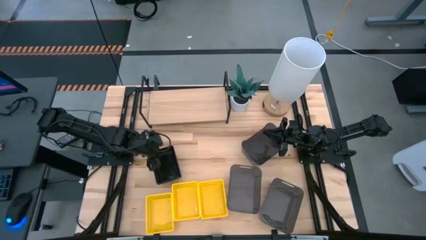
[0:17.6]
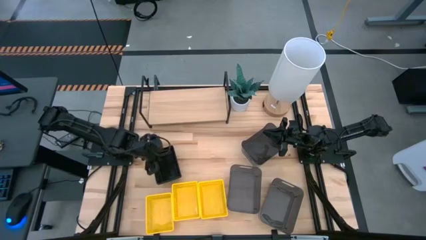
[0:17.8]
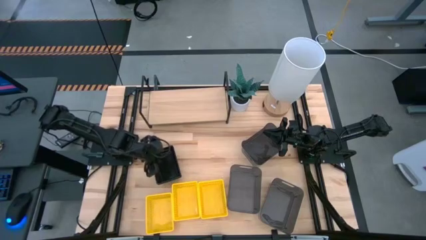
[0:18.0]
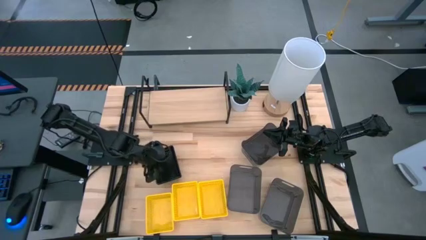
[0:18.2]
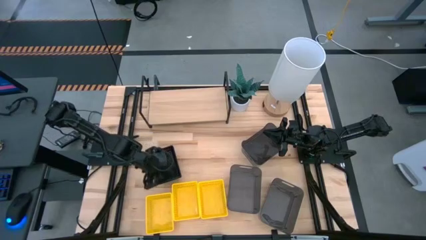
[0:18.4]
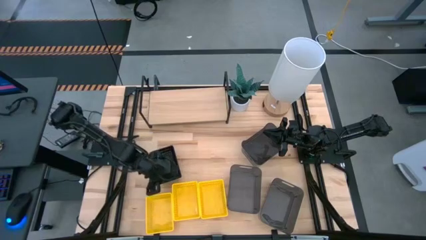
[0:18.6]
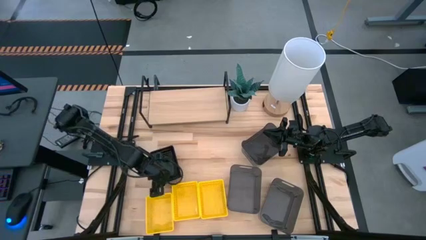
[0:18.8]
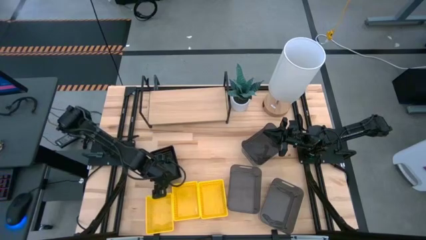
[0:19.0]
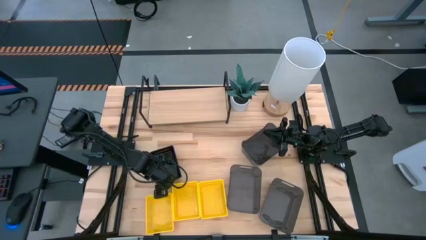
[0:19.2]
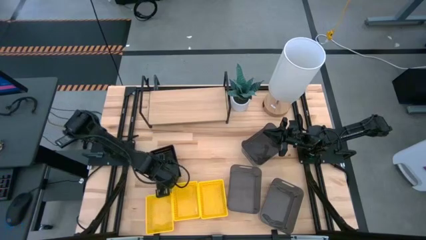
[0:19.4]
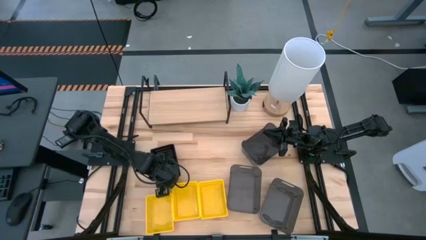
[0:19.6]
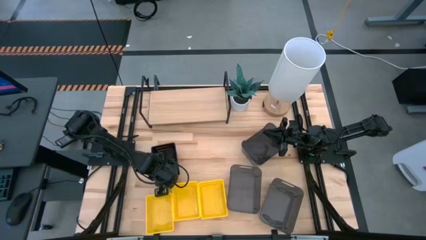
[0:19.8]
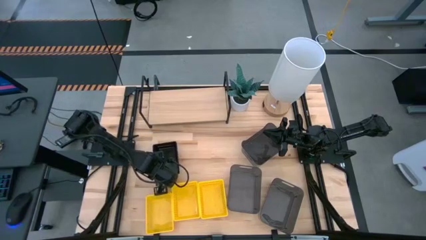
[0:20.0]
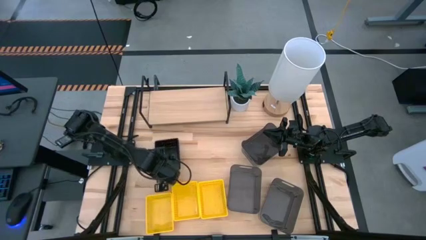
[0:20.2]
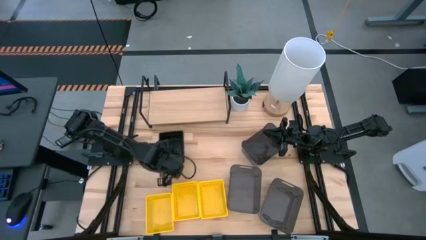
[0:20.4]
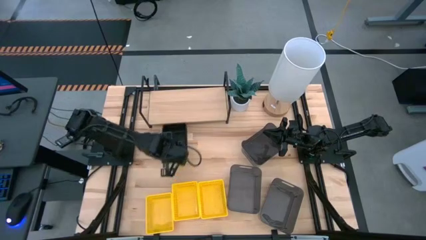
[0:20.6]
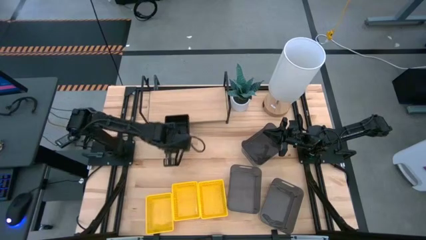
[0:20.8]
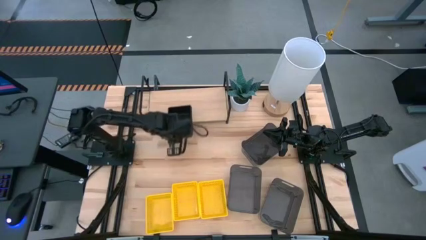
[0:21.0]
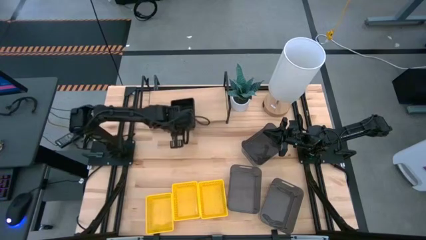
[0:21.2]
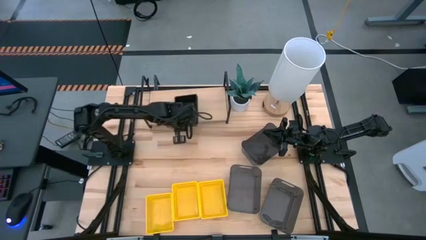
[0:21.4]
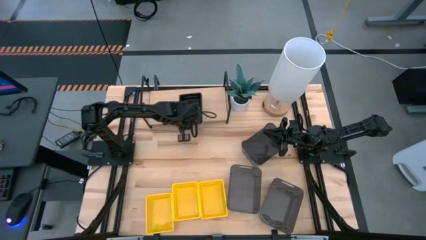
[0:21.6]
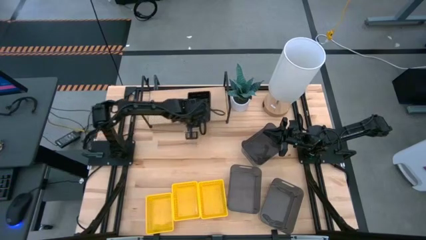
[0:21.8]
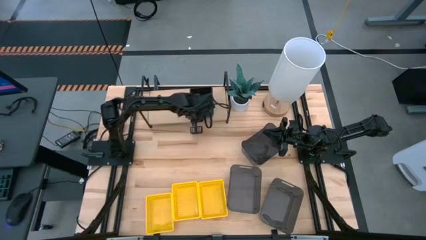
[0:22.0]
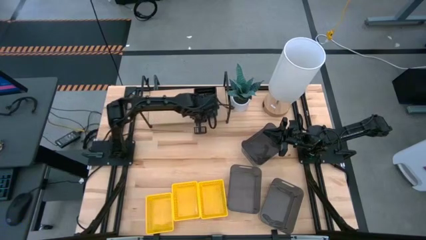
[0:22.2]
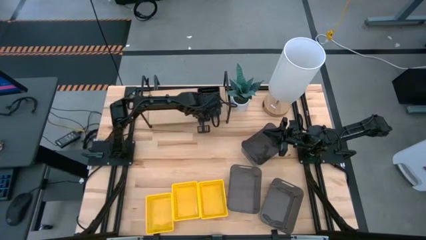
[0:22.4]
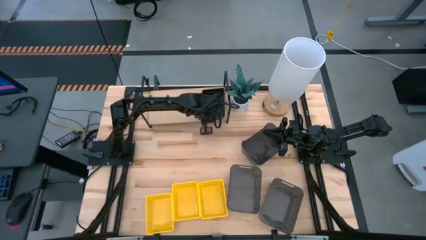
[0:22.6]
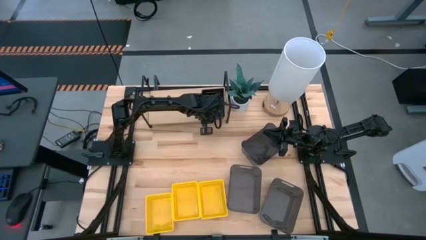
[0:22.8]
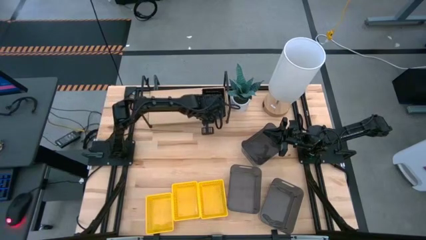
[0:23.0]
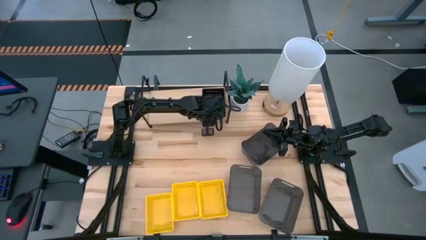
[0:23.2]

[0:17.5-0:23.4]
Task: Stack baskets on shelf by color
Put the stacked black bins on the shelf

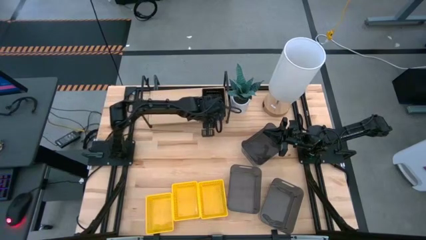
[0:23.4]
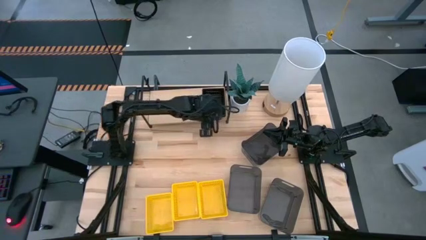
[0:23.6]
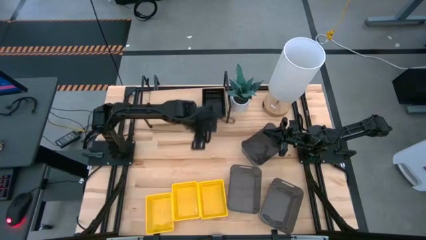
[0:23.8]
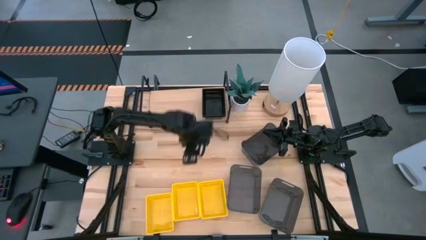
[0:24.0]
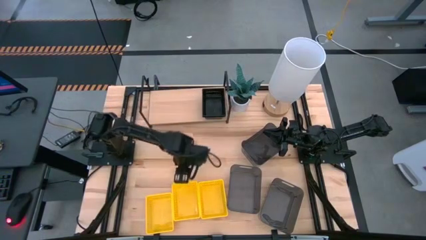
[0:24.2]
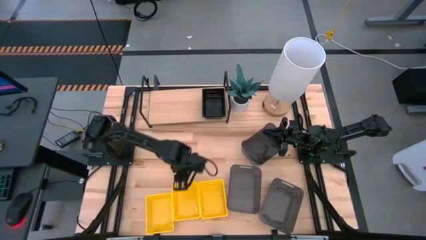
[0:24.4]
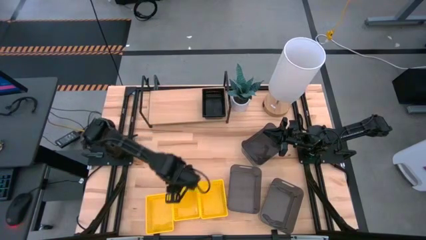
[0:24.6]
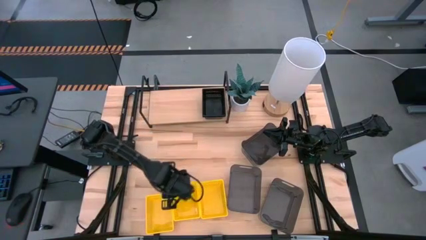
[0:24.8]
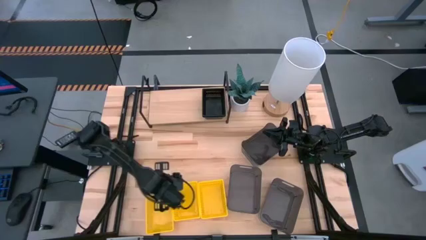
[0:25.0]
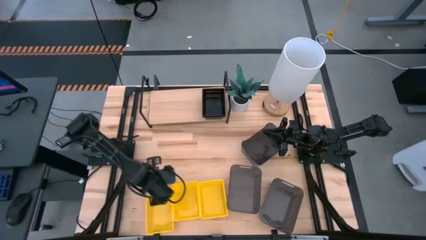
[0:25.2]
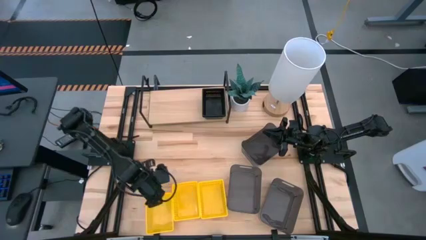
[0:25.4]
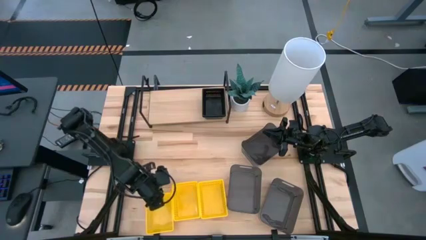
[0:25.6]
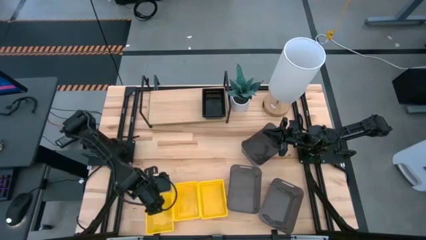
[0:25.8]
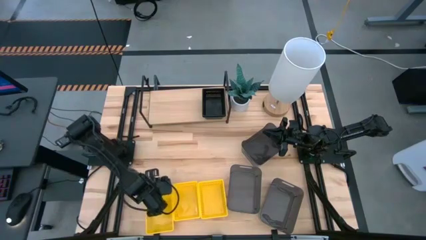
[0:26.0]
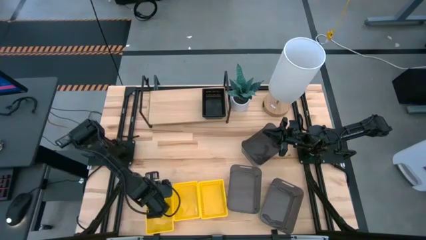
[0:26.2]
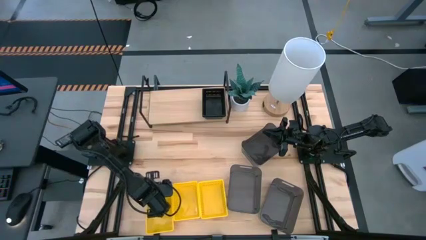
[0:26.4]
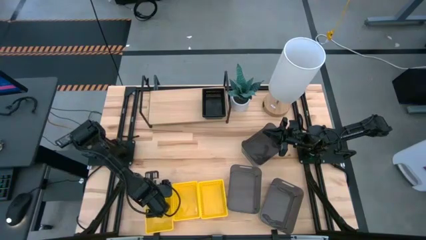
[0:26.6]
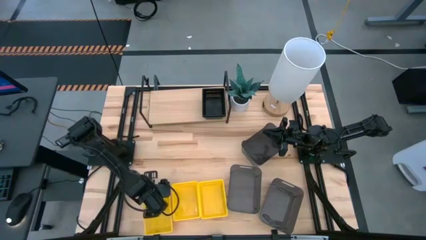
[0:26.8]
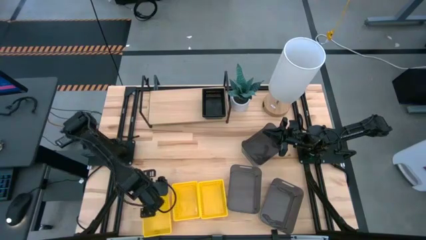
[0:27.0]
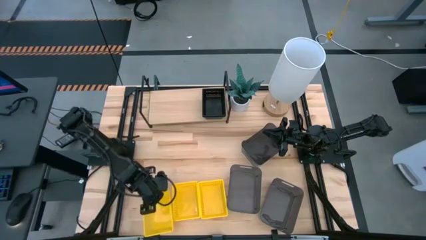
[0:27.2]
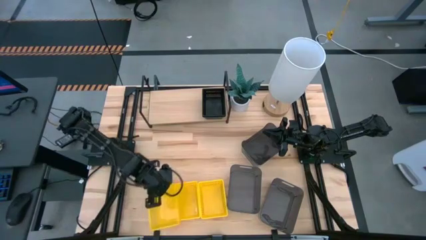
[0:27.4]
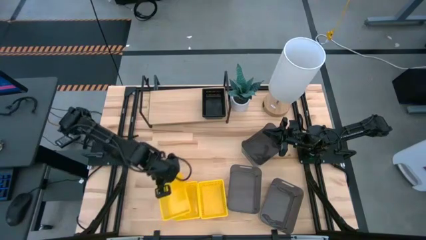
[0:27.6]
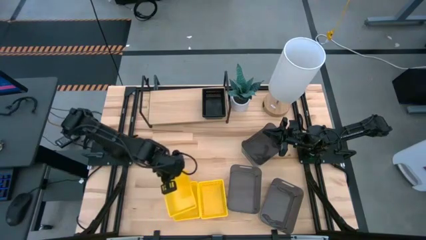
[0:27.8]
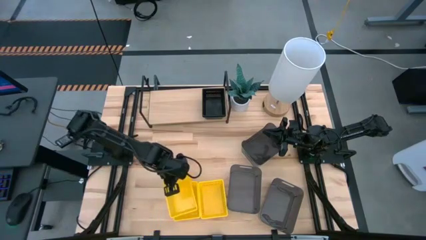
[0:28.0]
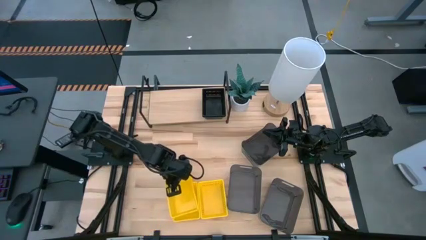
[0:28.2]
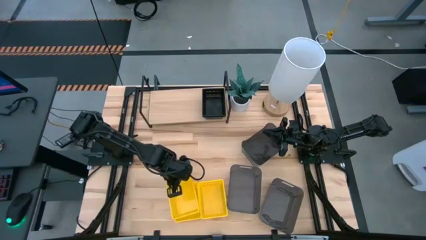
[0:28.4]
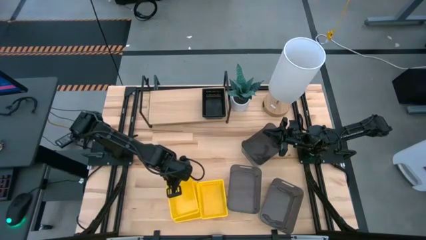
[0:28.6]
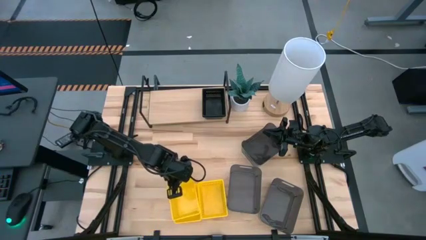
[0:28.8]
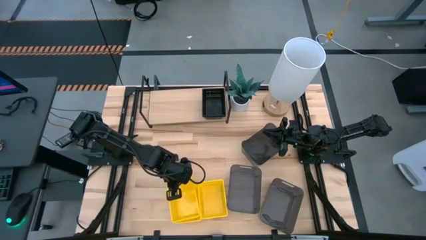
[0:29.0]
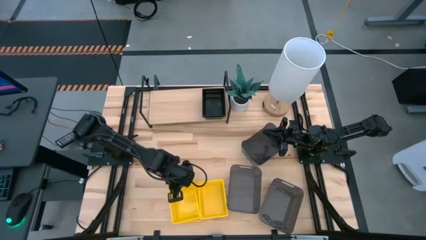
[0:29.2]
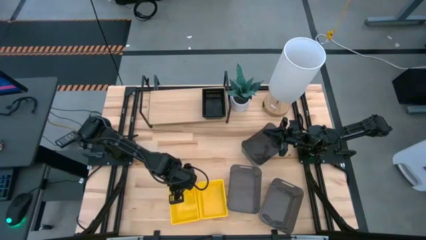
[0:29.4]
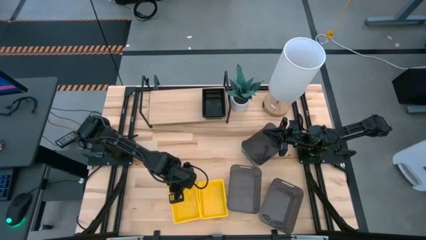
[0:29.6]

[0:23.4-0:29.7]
Stack the left yellow bin on the middle yellow bin

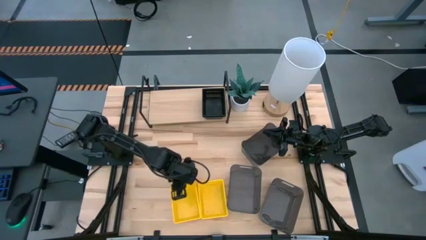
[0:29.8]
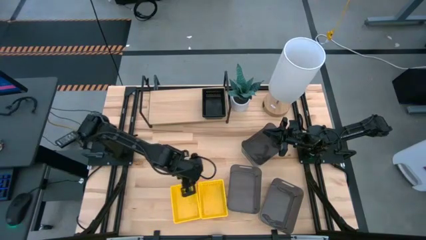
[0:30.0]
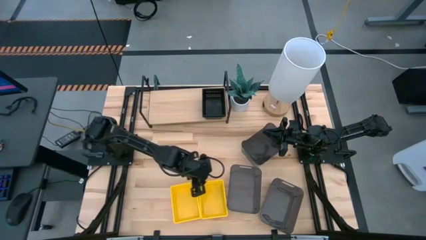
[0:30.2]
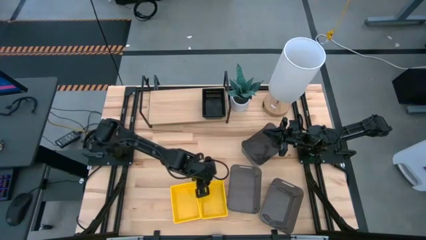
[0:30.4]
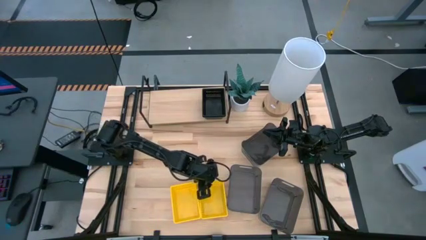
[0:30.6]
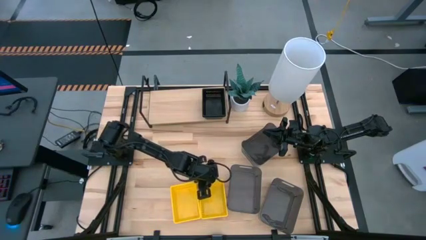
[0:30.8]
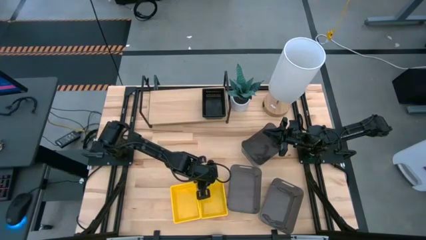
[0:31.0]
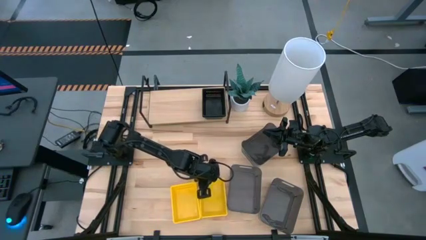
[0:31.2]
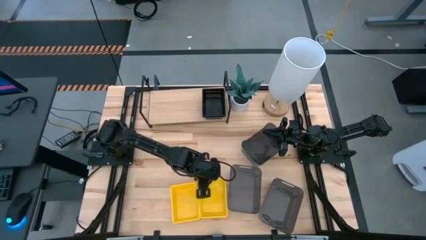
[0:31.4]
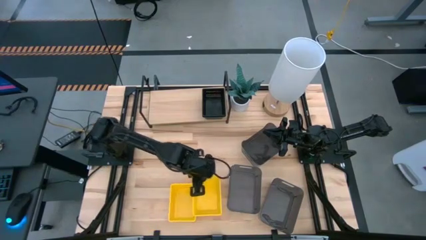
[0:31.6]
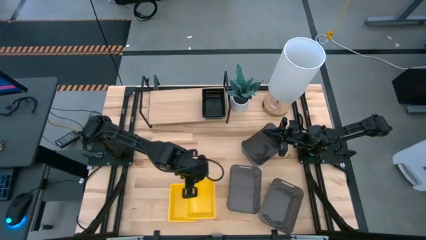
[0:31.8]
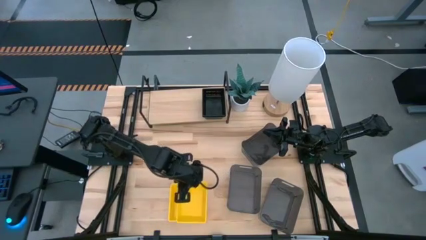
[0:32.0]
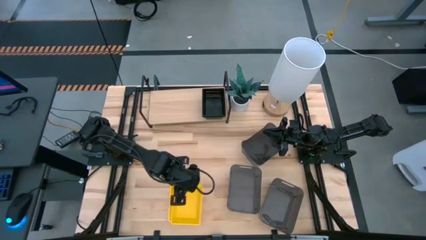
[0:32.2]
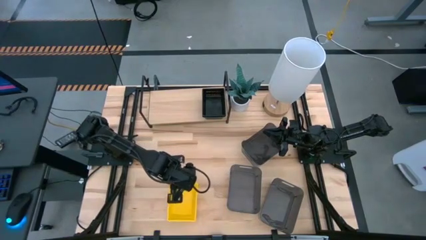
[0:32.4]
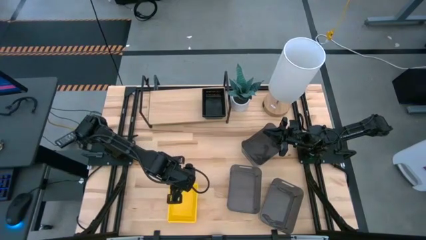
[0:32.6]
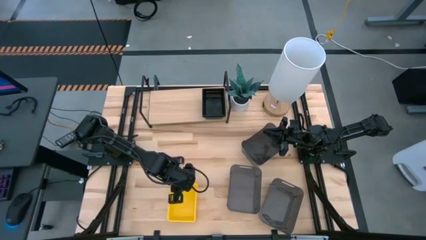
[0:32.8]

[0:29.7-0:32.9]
Stack the right yellow bin on the yellow bin

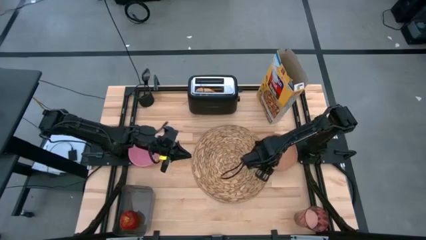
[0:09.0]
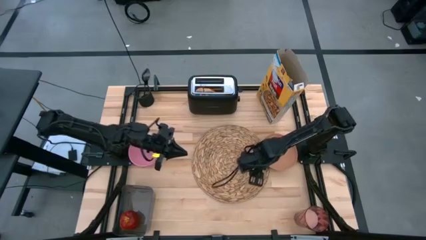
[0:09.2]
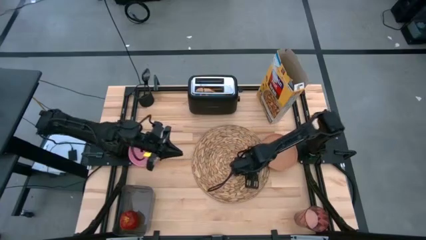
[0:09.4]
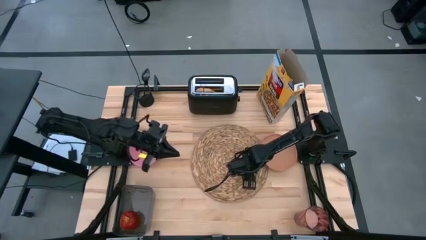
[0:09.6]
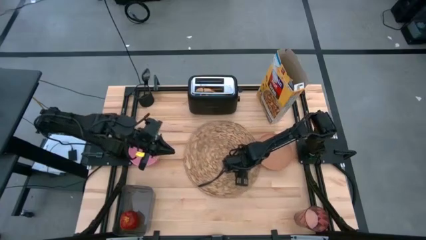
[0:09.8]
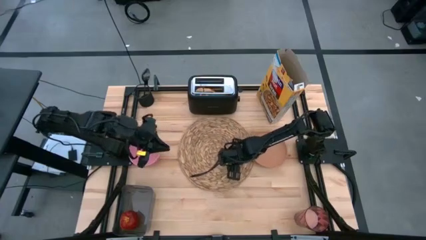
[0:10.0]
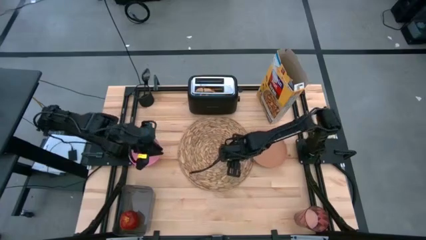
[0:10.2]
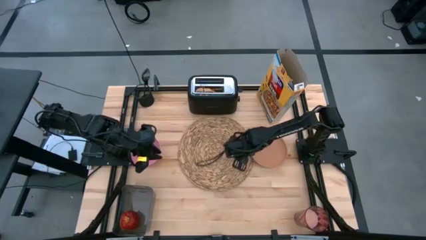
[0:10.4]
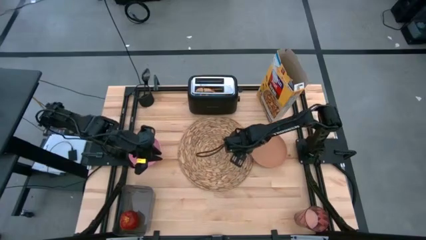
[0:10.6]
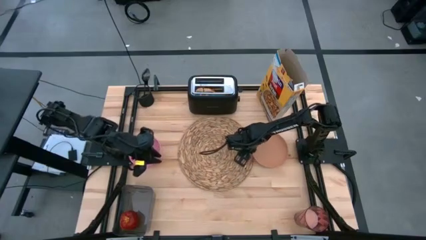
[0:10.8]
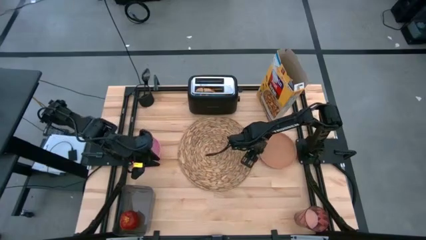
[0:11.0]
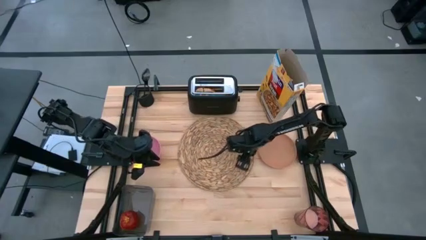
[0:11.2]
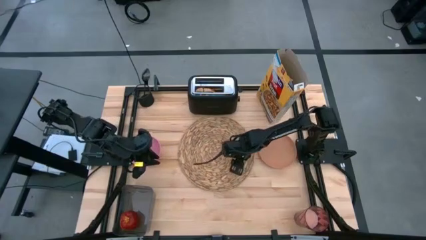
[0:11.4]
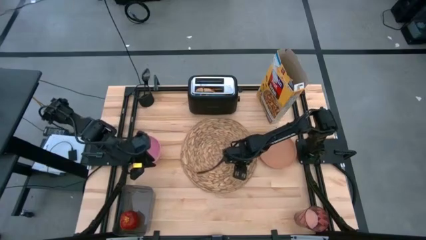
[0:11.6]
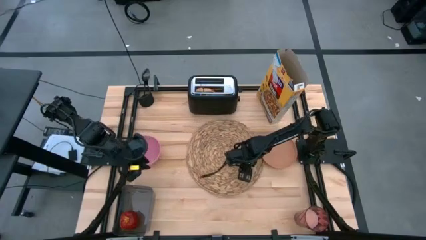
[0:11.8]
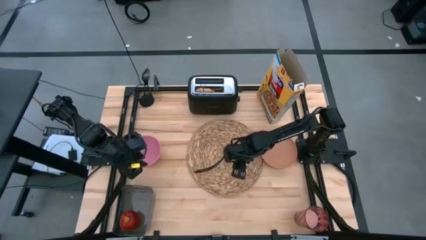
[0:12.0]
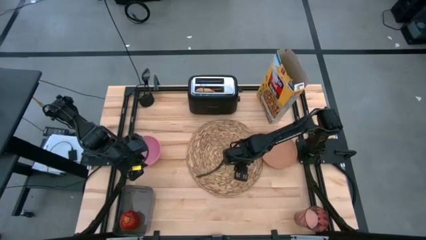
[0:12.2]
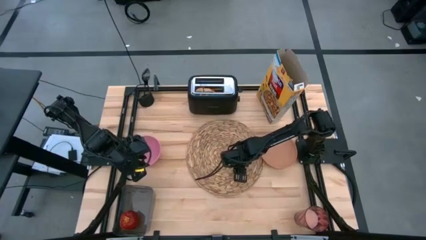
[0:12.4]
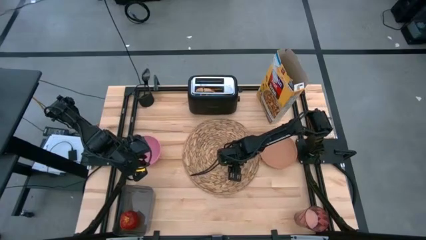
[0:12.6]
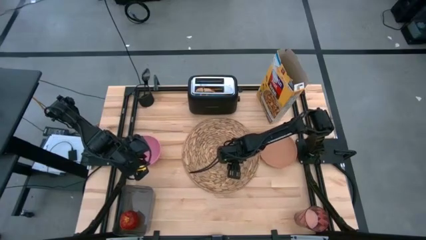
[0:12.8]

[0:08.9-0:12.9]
Task: Arrange a breakfast setting
Adjust the brown placemat
